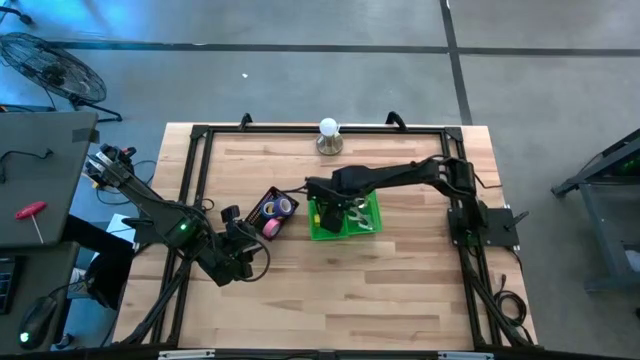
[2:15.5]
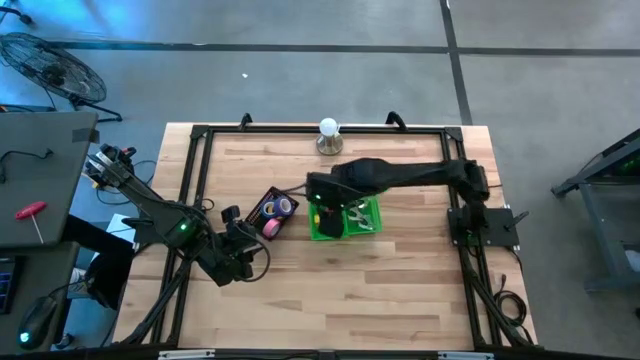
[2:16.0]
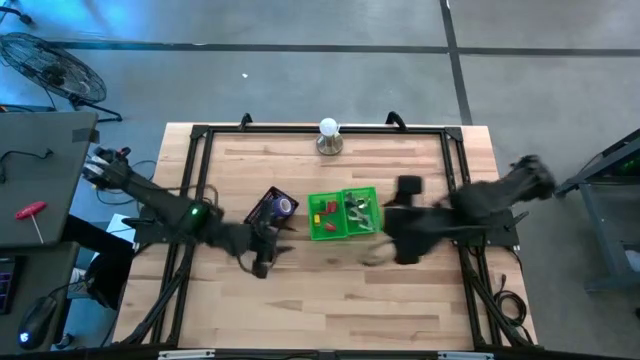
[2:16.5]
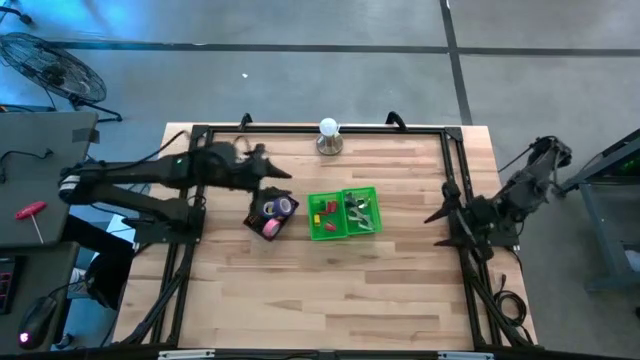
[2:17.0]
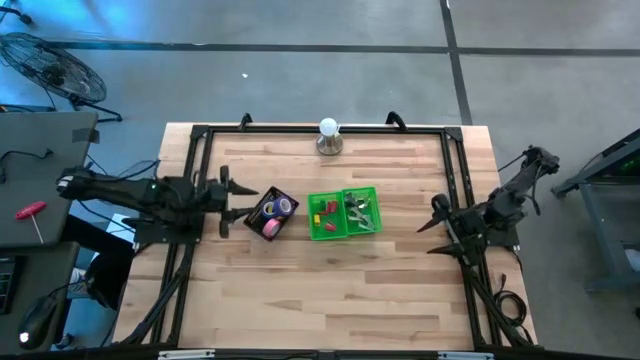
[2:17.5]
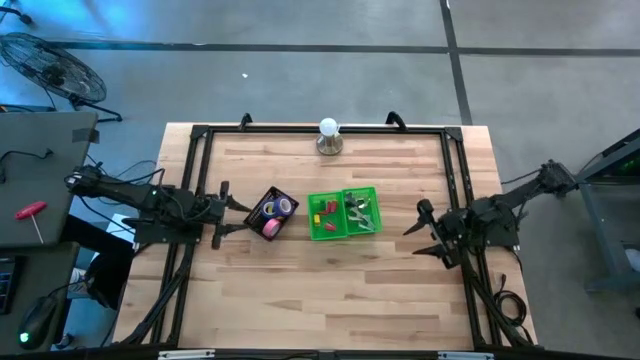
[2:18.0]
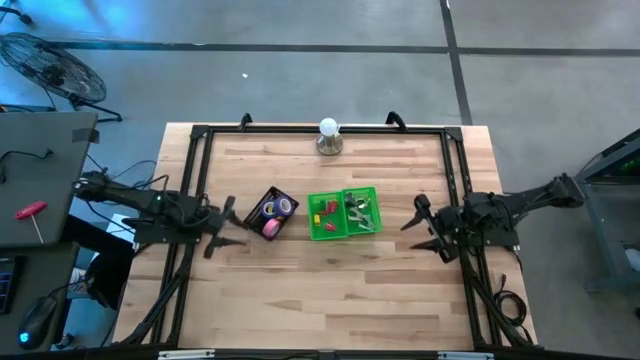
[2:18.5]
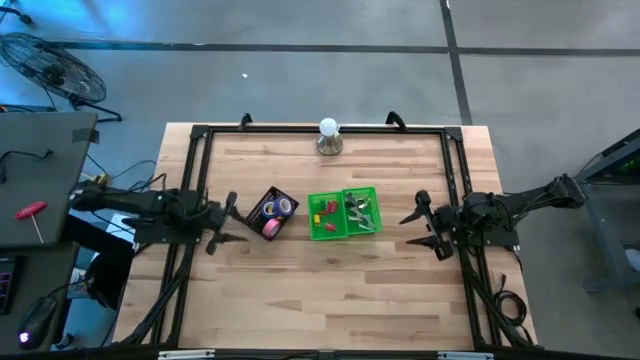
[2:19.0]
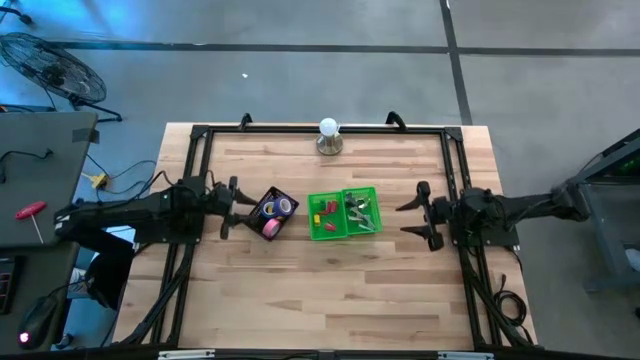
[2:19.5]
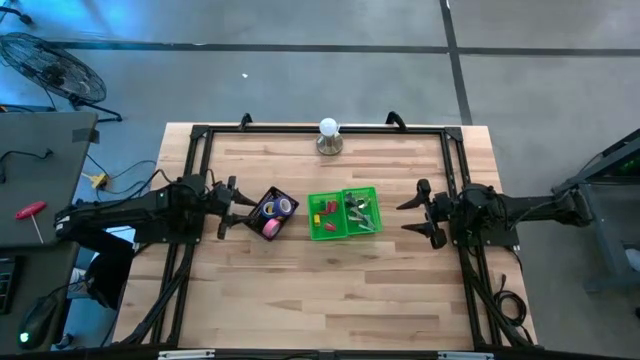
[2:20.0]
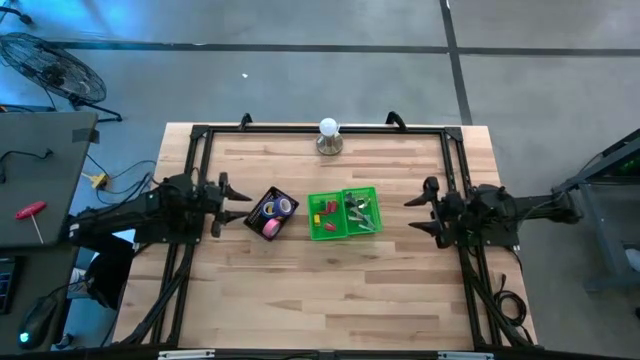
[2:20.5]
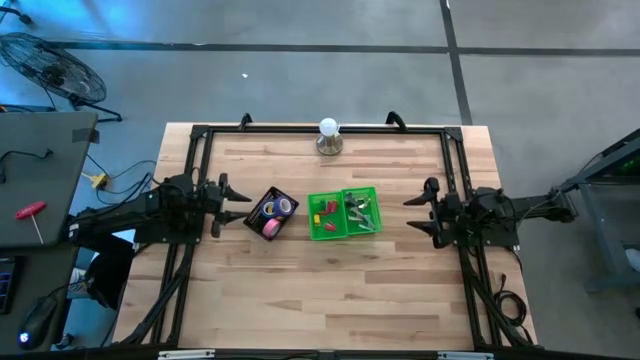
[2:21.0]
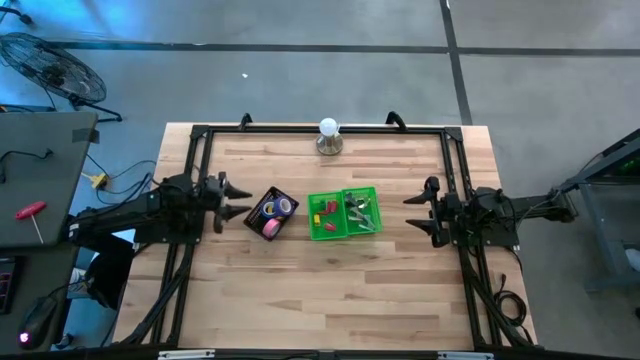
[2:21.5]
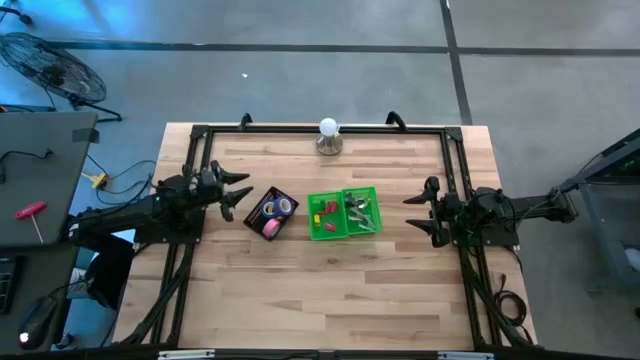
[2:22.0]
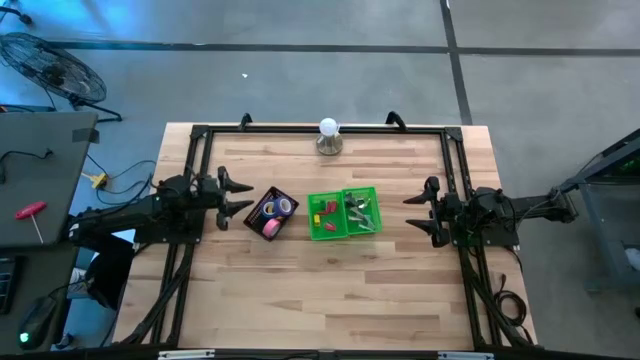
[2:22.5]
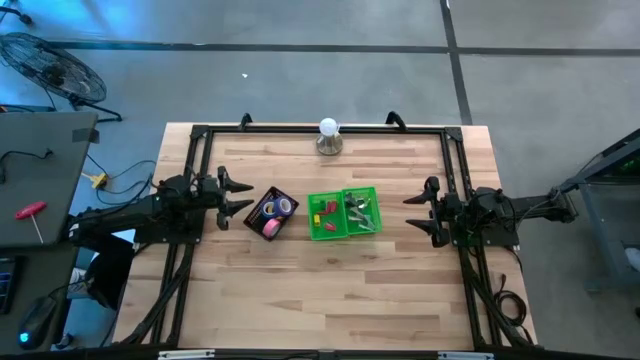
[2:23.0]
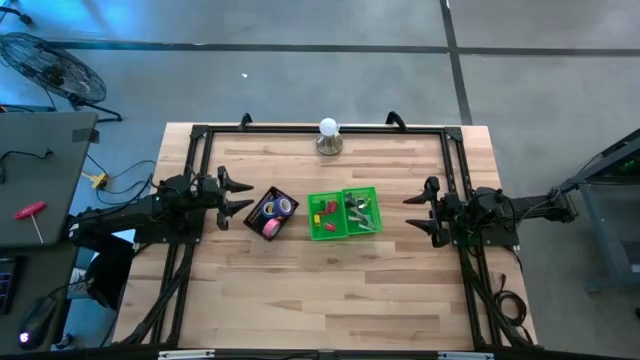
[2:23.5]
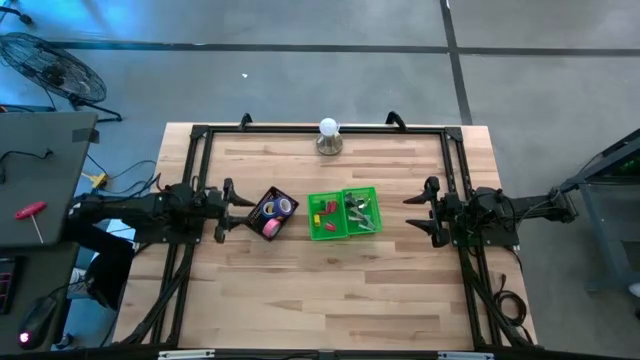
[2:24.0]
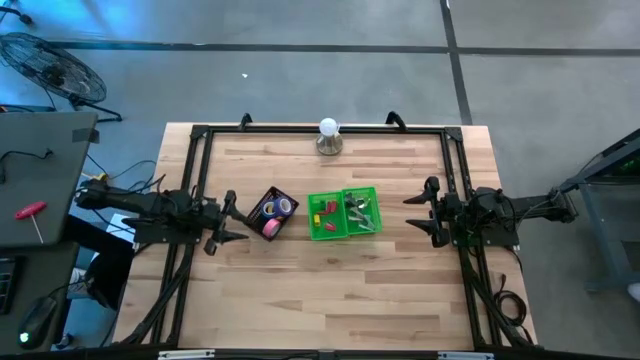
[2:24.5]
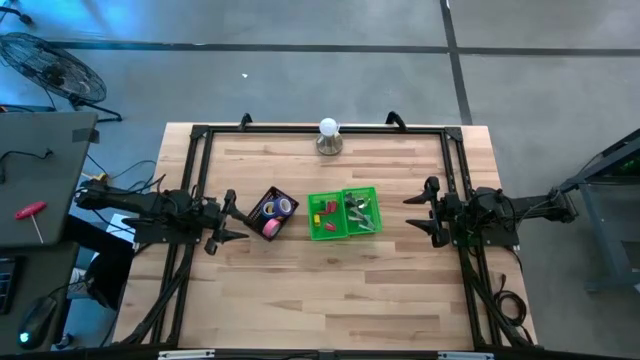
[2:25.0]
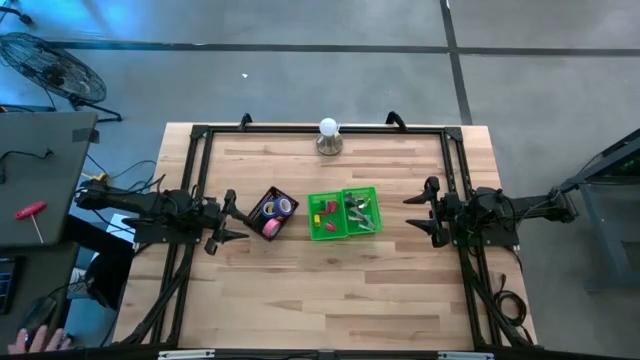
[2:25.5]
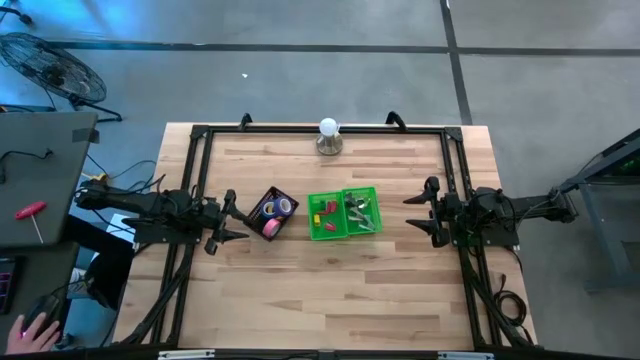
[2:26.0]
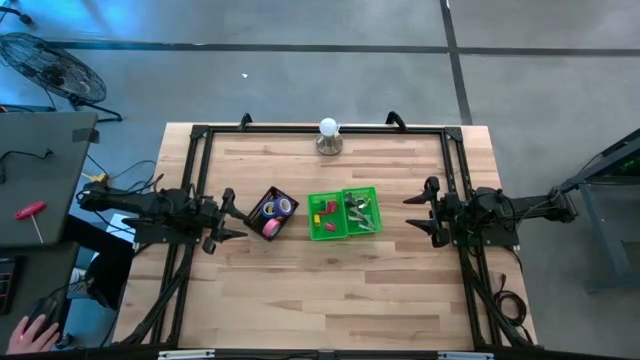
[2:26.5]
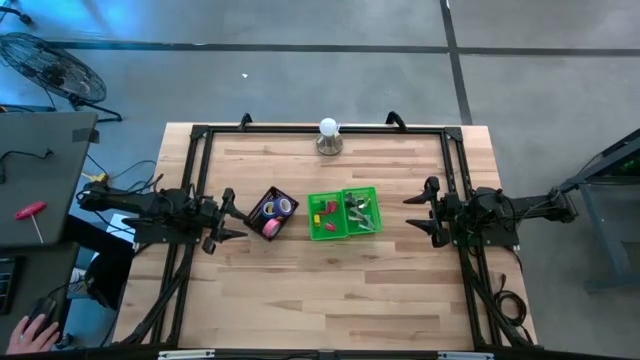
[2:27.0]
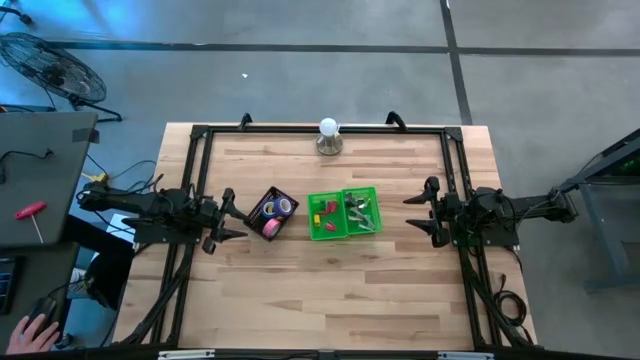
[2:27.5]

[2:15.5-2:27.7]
Task: Pick and place Stapler, Stapler remover, tape
Return to Home Position

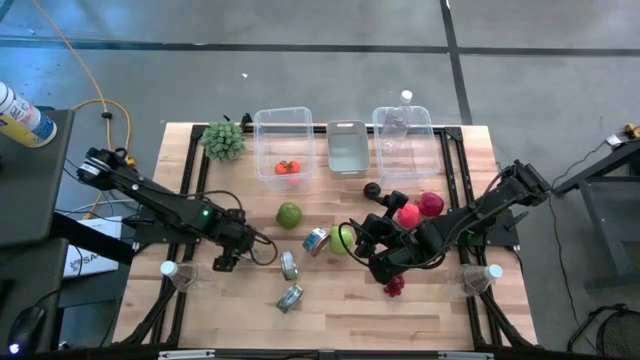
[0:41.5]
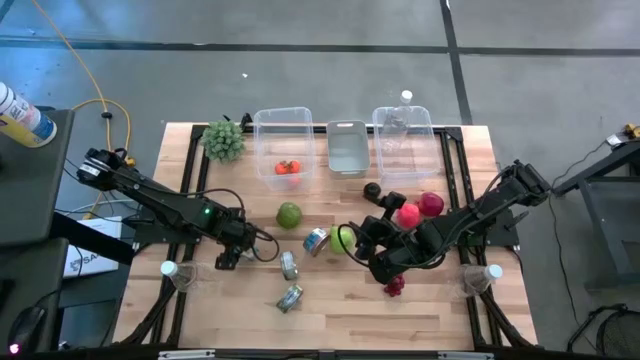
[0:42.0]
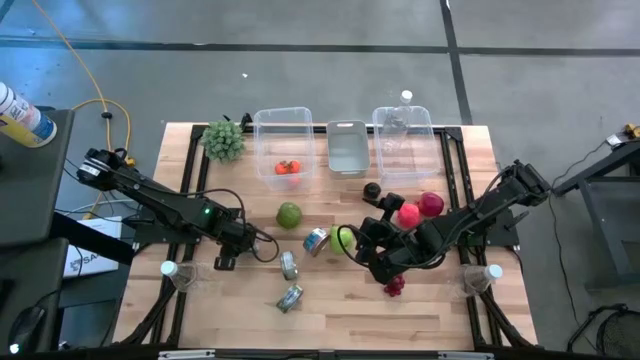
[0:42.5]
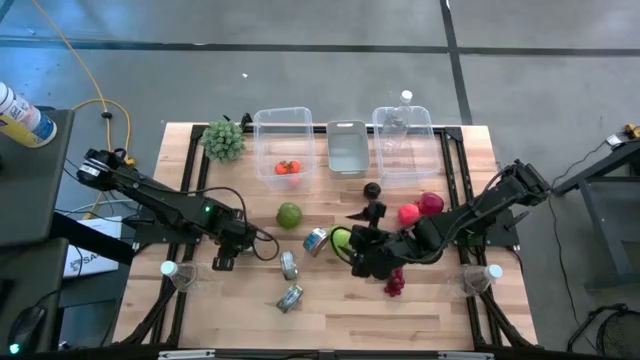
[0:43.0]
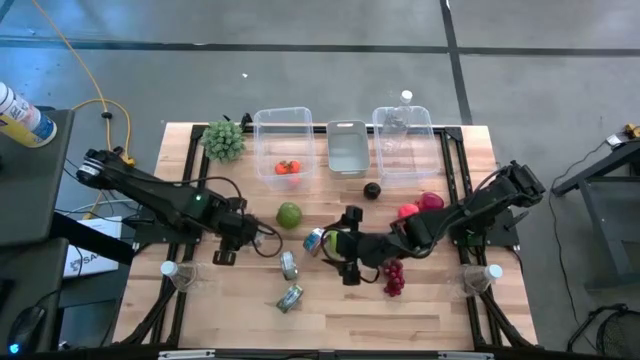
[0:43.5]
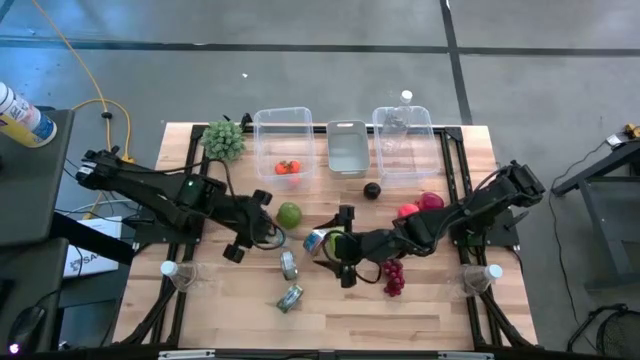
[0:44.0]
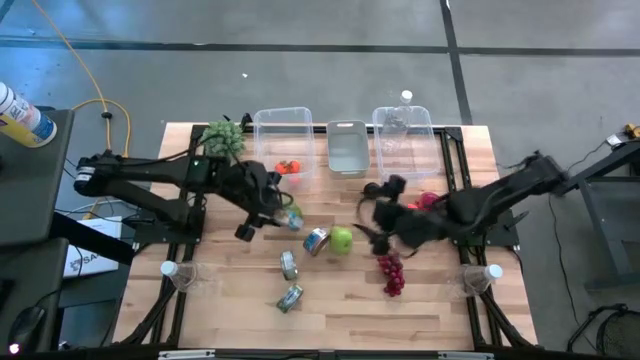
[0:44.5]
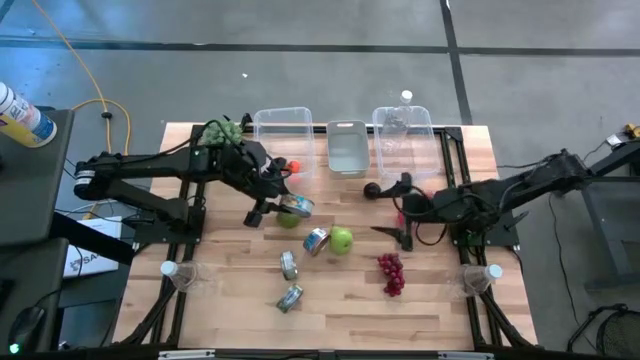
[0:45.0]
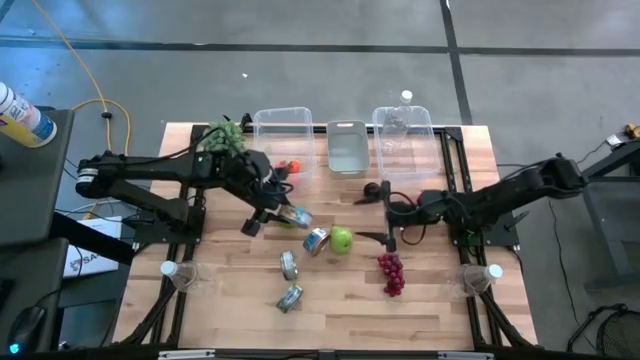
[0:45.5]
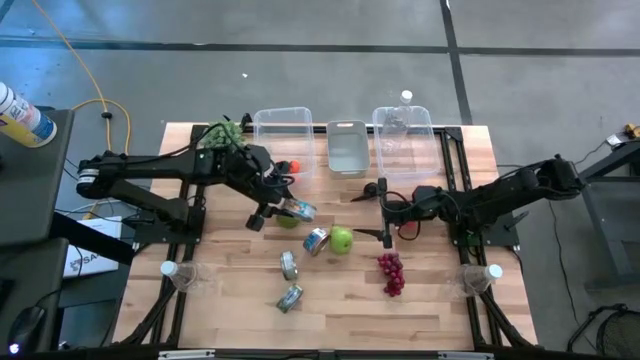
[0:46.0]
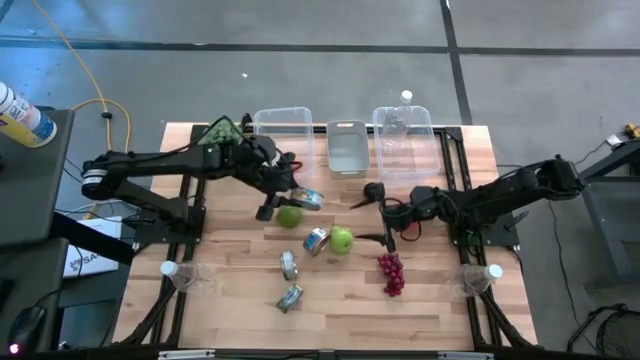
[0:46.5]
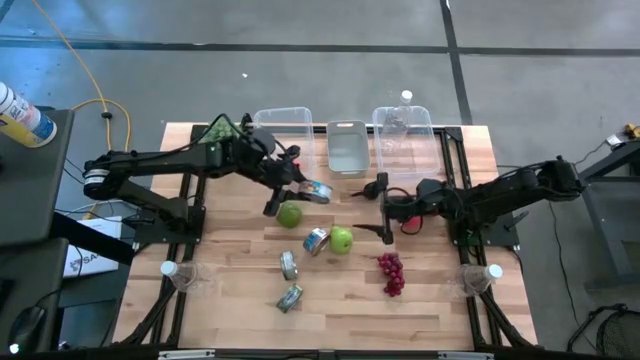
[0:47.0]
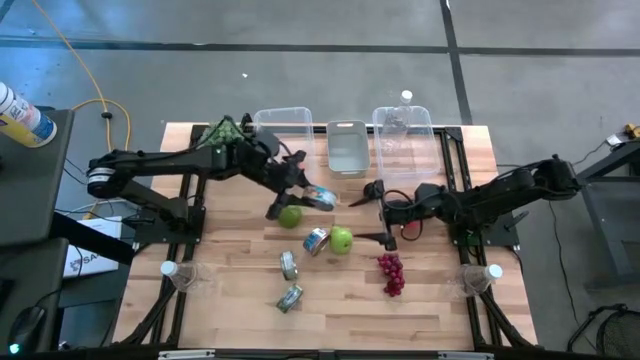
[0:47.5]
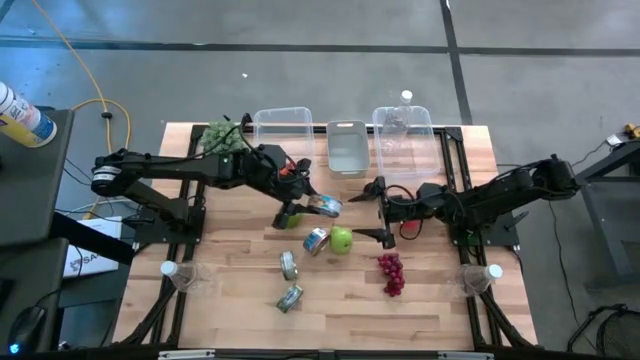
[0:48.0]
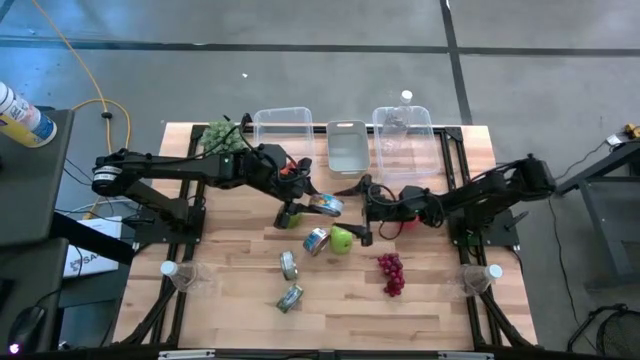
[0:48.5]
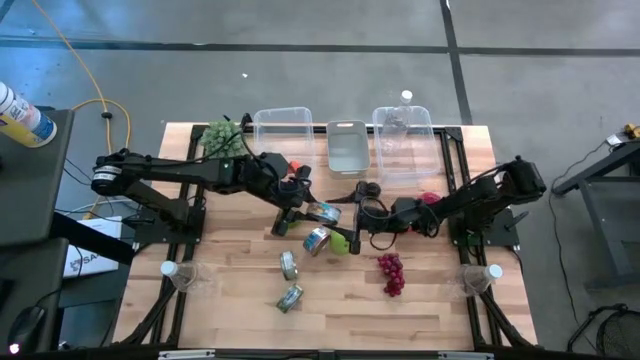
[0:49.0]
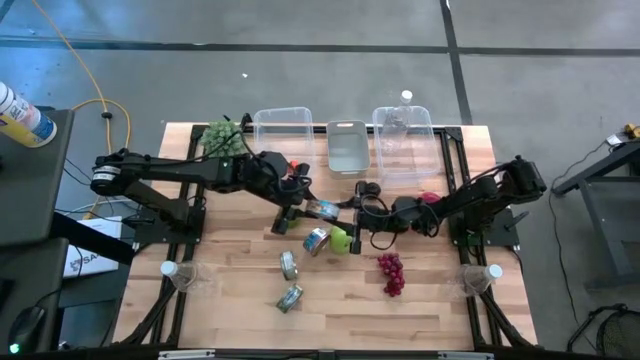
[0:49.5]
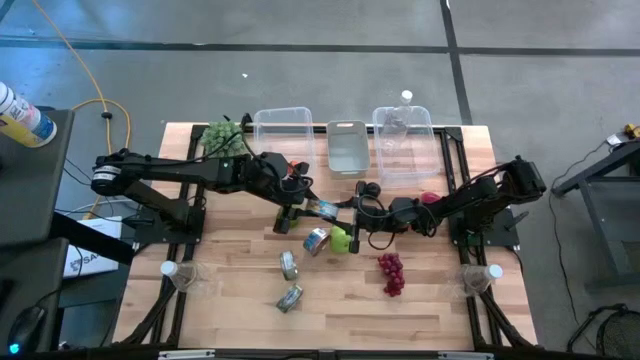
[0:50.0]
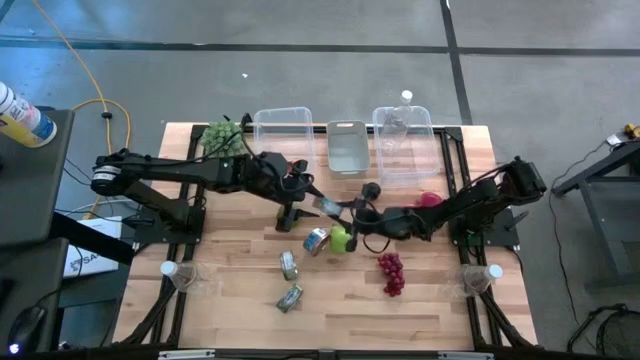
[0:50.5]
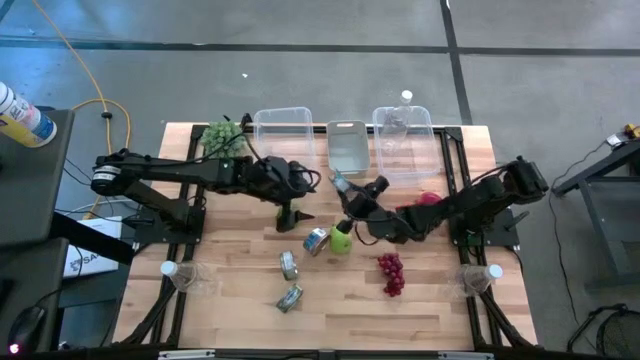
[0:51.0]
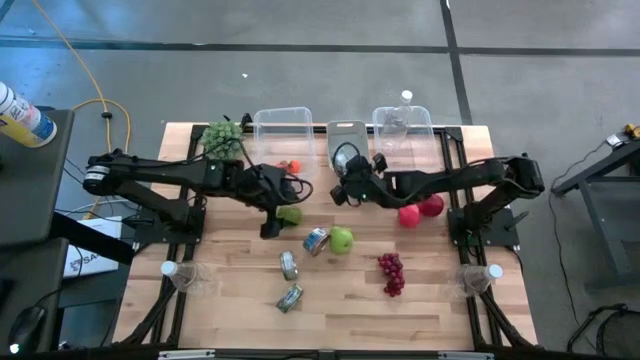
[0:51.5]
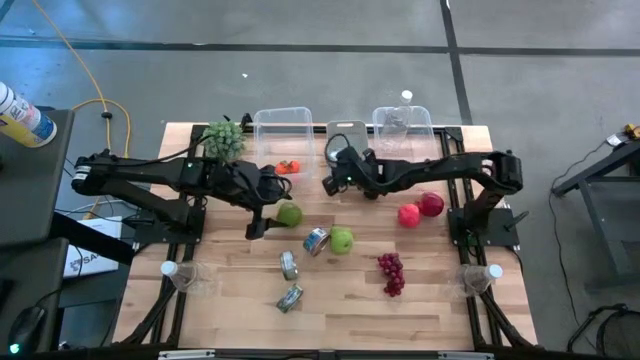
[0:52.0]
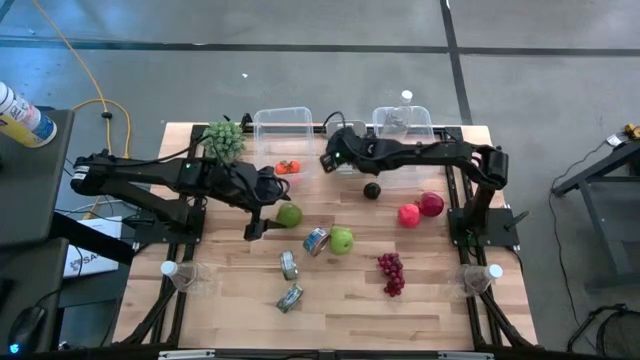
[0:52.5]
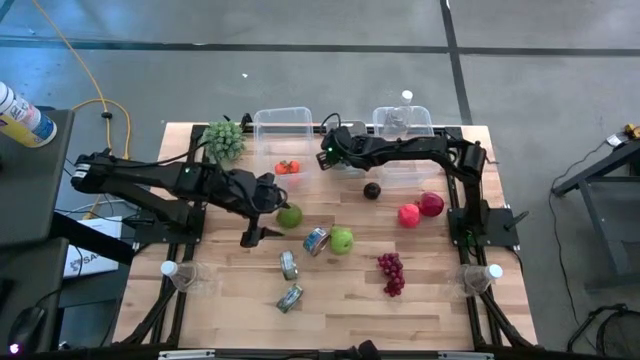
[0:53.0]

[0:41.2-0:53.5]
Task: Pick & Place Food Item
Put the yellow and blue tuna can into the gray bin
